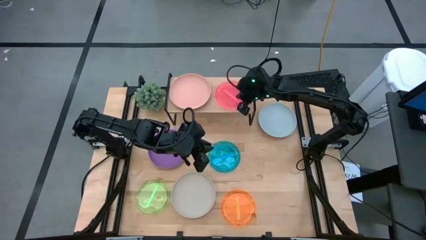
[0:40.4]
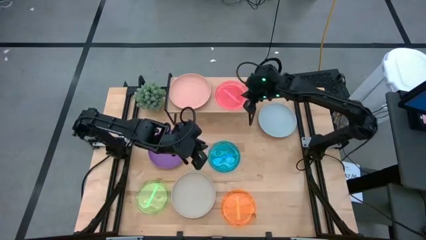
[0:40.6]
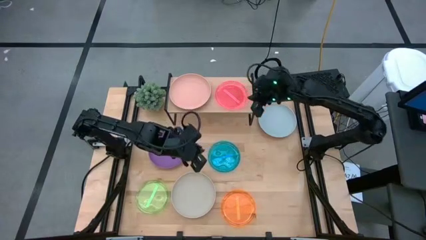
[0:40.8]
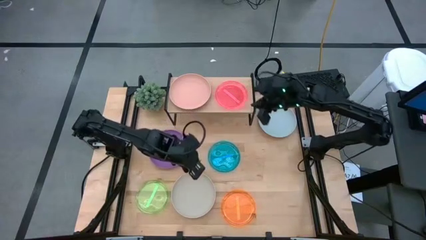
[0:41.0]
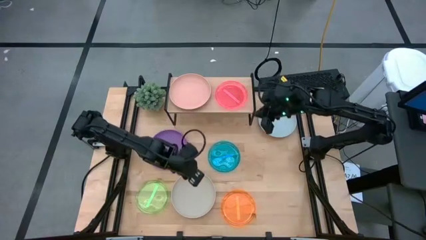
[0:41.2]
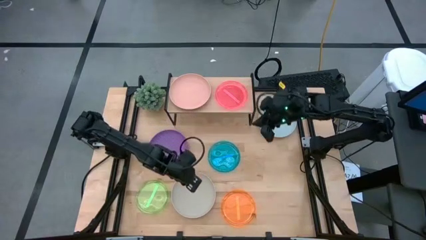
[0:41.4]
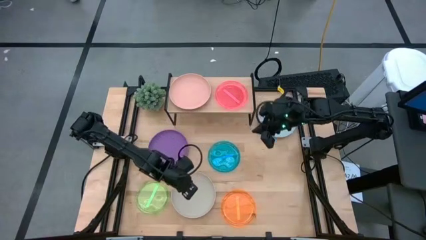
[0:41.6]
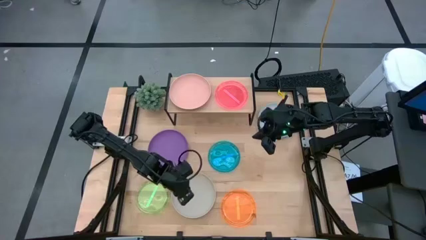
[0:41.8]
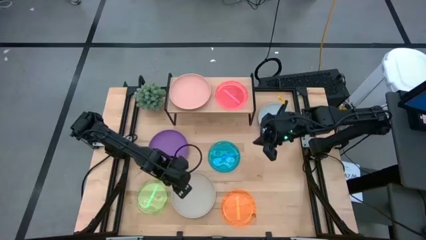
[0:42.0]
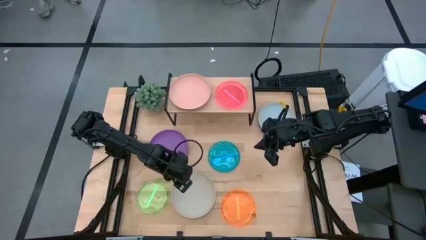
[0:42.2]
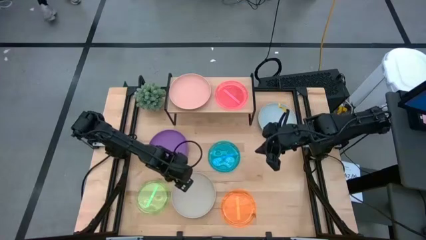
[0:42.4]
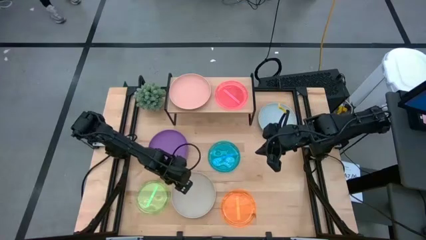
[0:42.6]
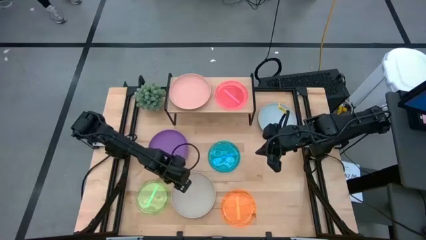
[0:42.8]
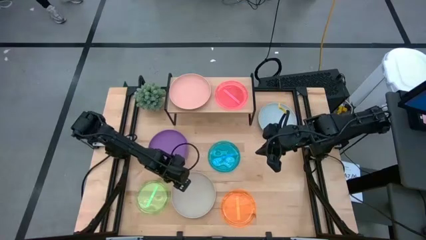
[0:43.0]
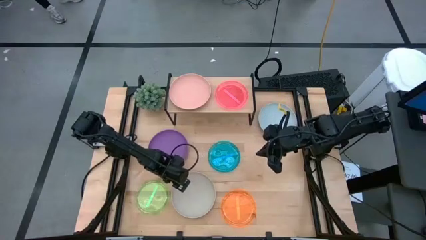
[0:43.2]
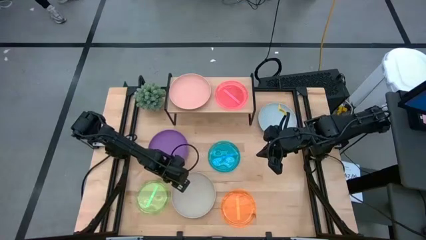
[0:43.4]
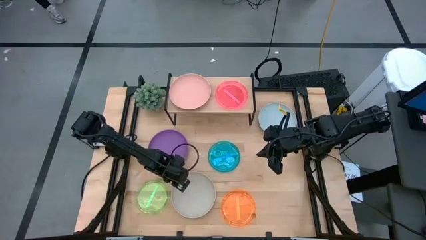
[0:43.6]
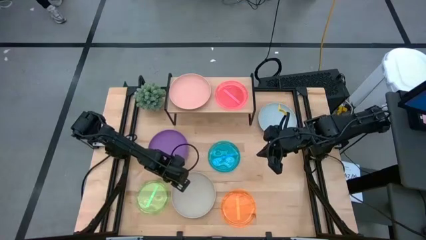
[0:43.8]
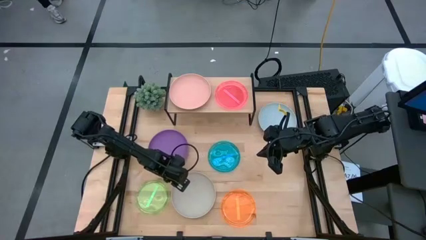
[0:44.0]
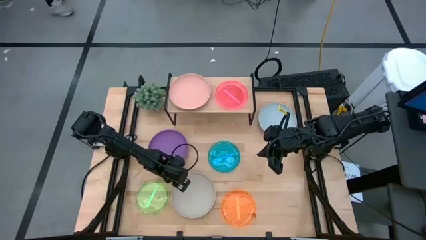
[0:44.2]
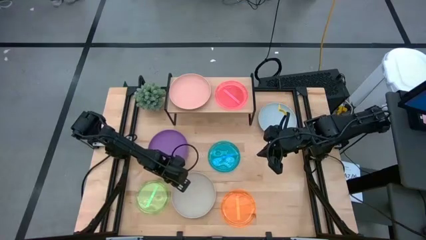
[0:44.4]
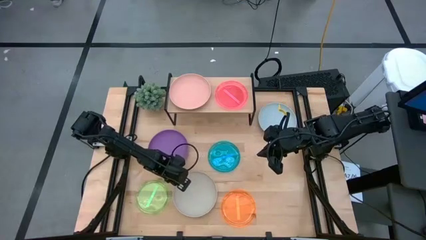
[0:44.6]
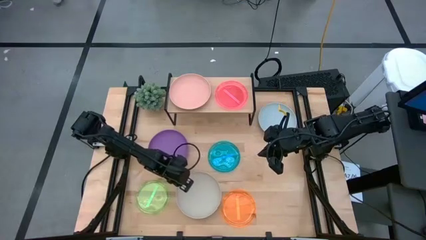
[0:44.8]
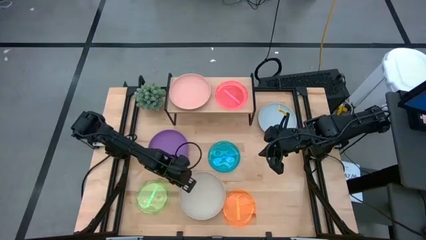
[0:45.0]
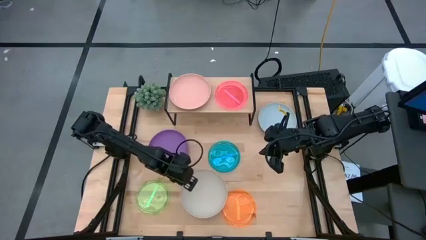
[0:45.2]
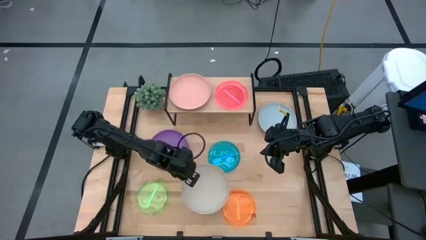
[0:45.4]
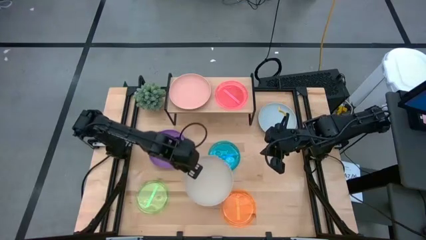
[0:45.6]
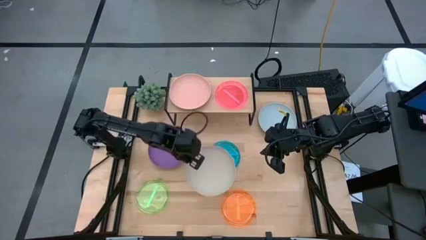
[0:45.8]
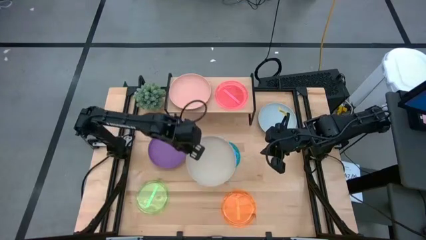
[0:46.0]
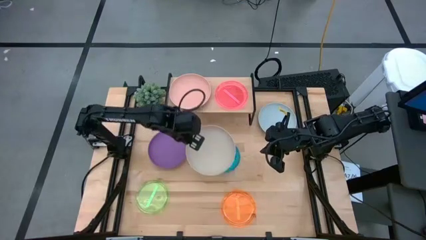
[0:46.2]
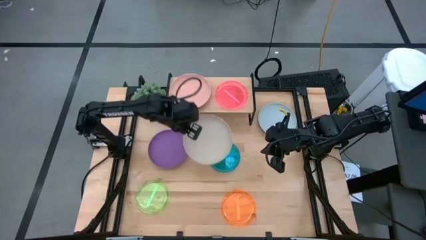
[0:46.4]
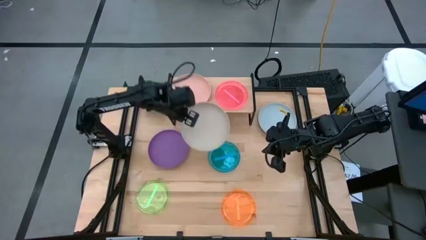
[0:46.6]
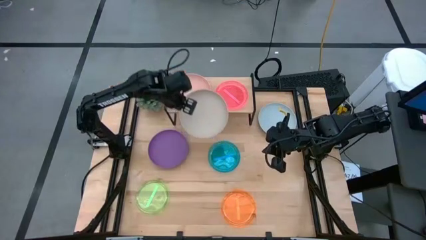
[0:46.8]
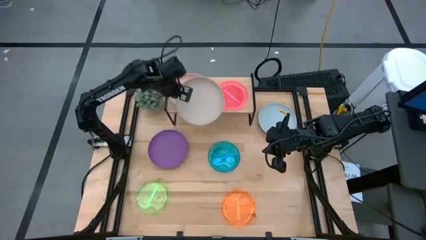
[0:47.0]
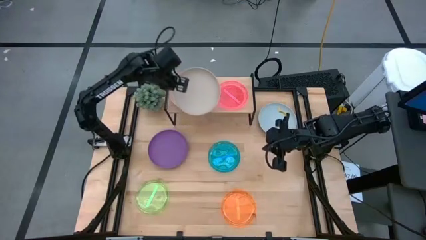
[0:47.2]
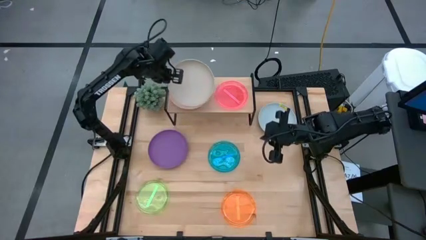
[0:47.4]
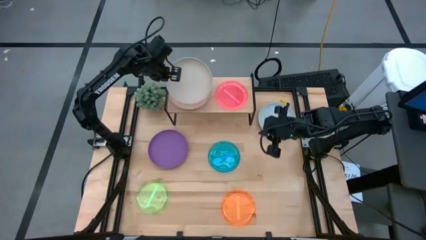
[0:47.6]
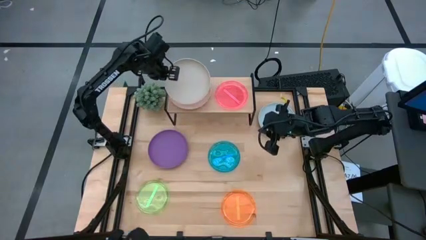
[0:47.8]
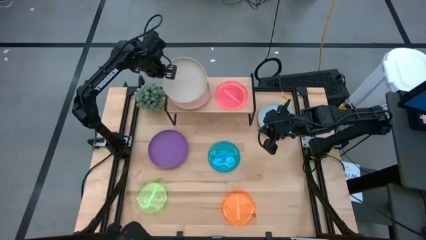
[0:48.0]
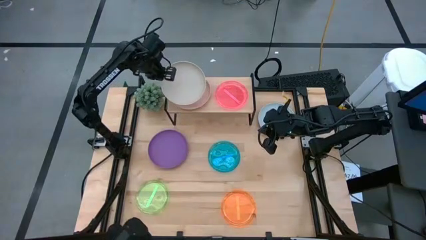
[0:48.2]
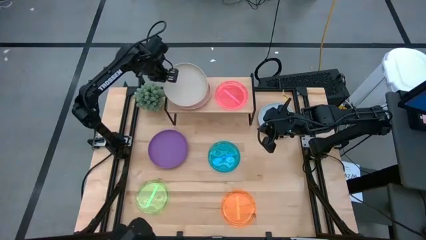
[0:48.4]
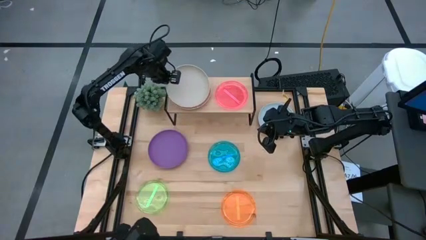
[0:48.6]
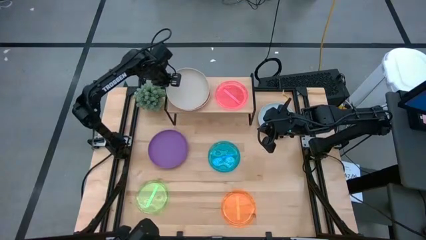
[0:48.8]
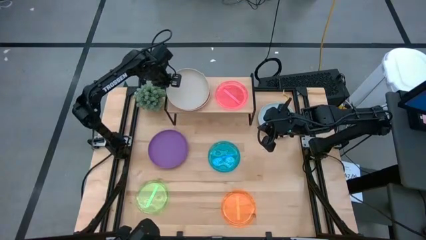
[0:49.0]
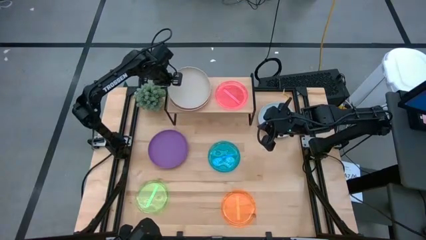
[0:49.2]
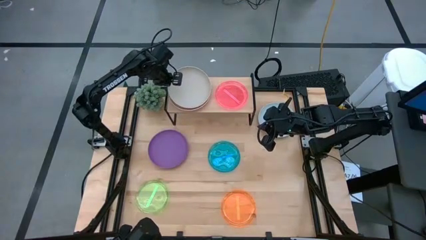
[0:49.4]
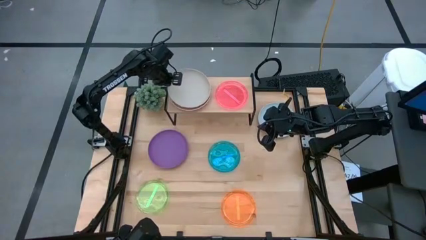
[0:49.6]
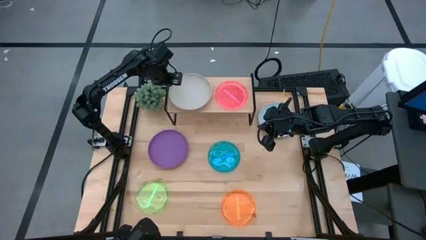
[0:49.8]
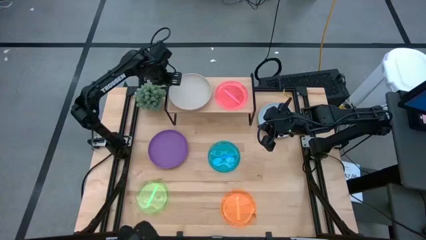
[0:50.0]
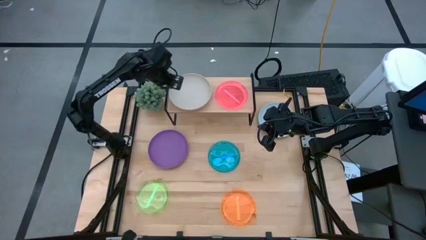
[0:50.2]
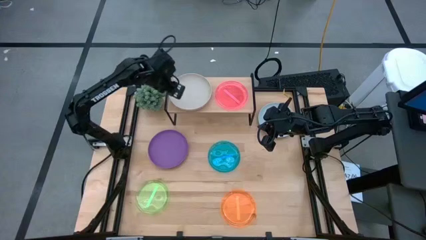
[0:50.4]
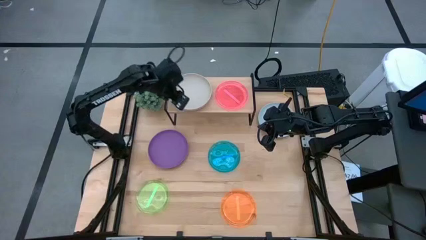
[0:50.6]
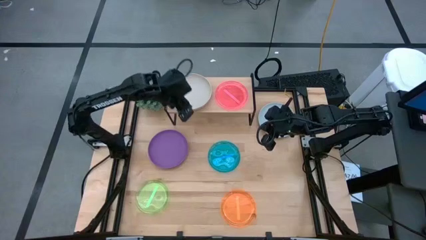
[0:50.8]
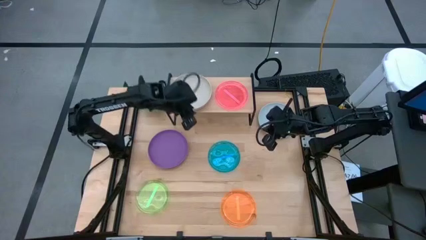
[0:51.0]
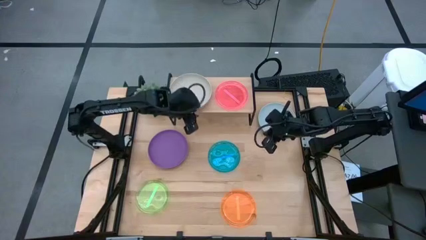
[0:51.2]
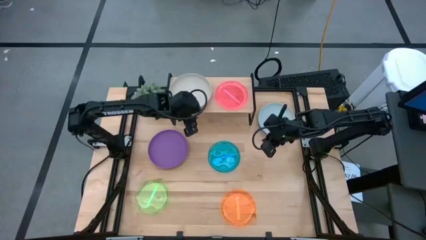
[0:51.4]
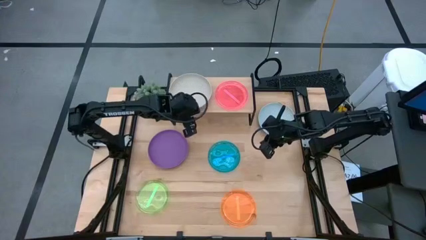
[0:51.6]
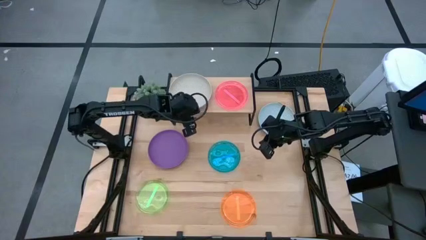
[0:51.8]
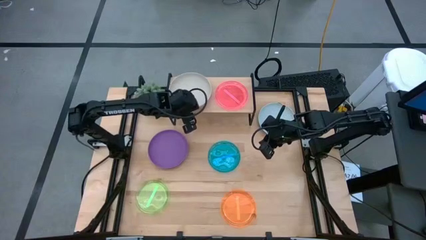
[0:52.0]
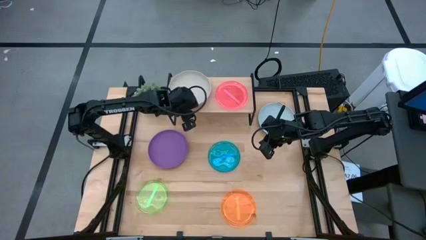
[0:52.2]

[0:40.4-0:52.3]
Task: Place and stack plates onto a shelf
Stack the gray plate on top of the pink plate on the shelf

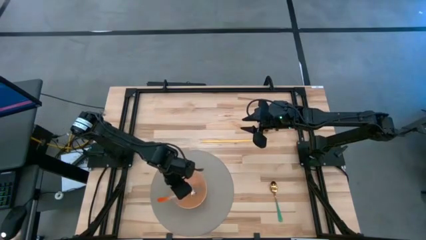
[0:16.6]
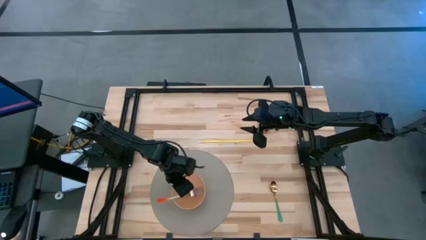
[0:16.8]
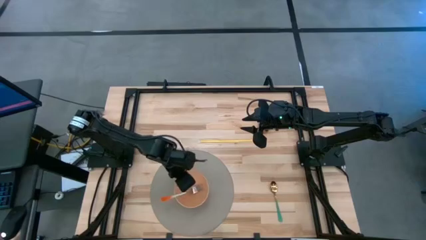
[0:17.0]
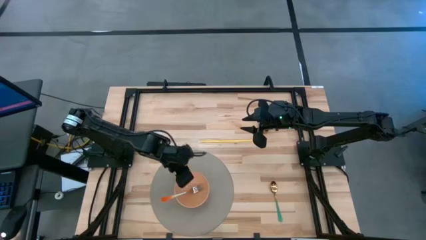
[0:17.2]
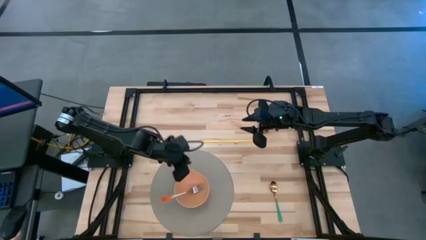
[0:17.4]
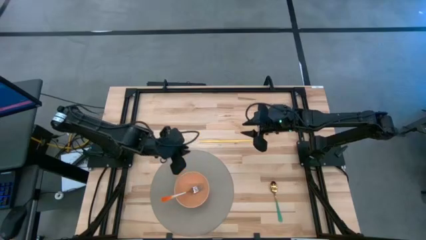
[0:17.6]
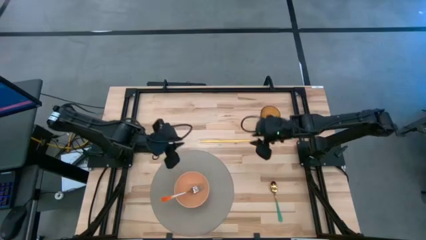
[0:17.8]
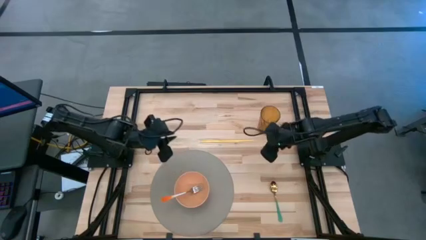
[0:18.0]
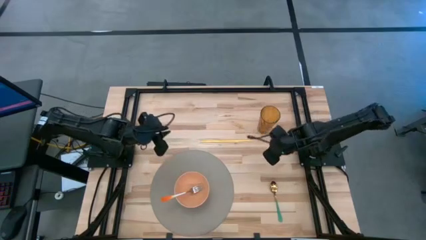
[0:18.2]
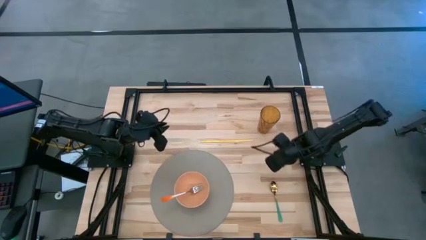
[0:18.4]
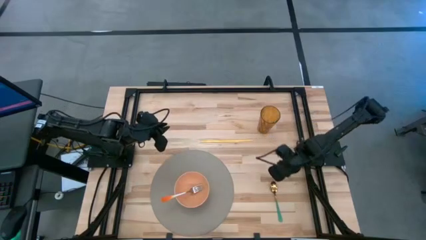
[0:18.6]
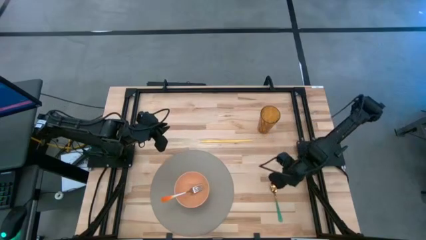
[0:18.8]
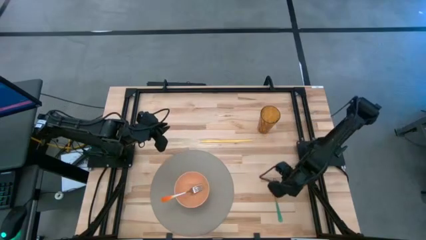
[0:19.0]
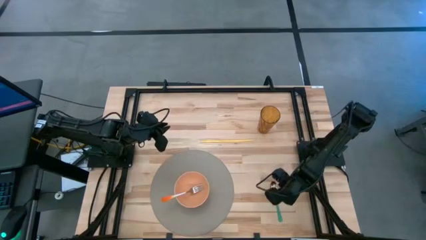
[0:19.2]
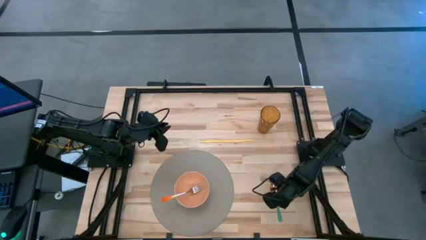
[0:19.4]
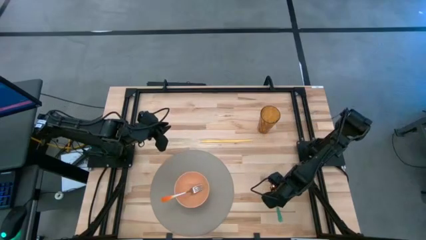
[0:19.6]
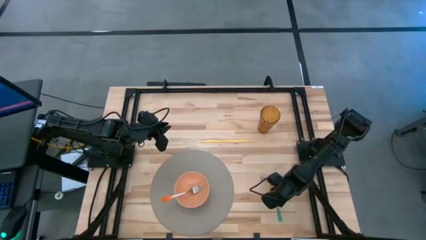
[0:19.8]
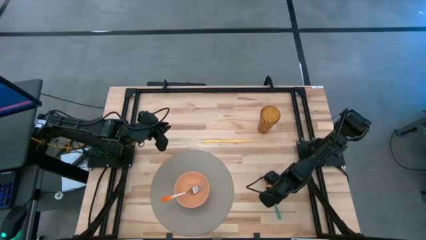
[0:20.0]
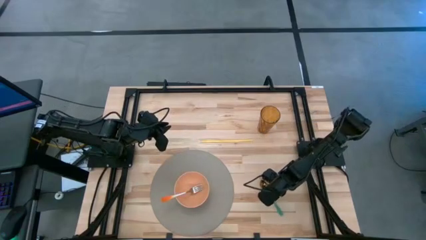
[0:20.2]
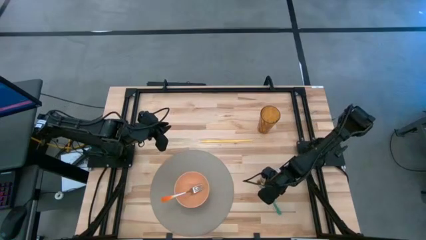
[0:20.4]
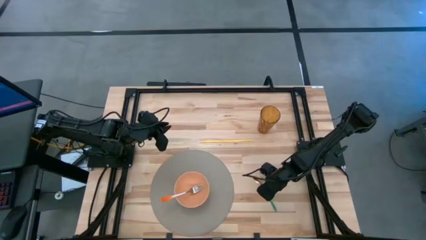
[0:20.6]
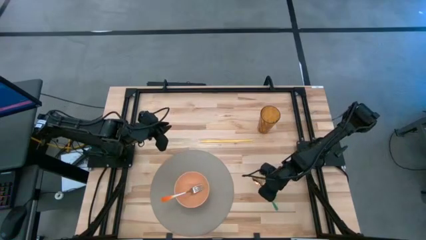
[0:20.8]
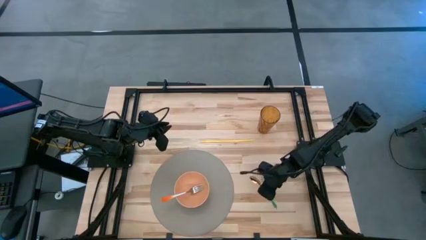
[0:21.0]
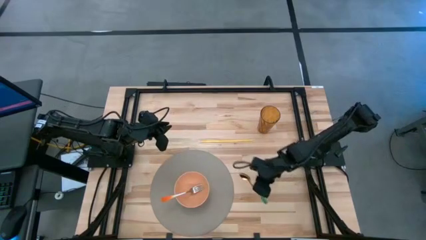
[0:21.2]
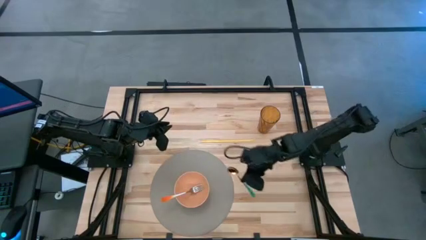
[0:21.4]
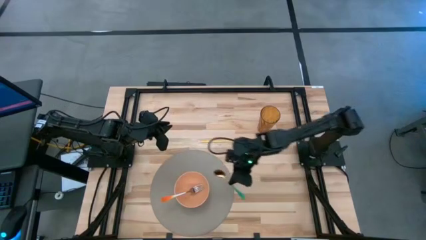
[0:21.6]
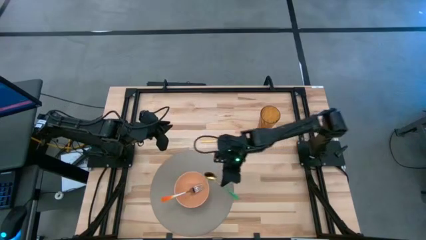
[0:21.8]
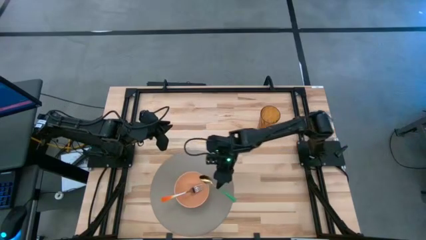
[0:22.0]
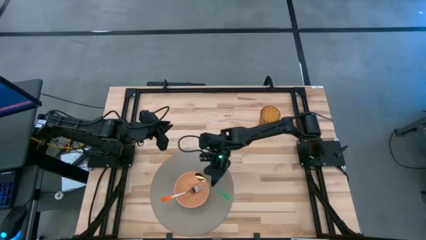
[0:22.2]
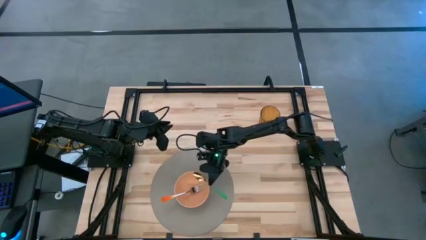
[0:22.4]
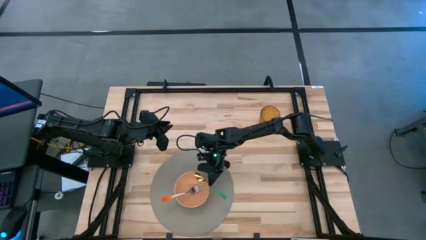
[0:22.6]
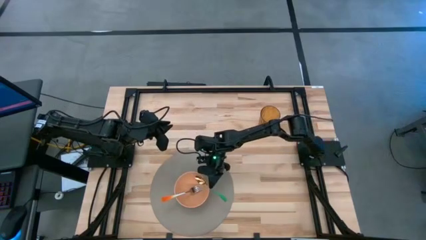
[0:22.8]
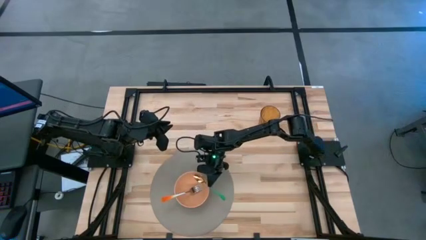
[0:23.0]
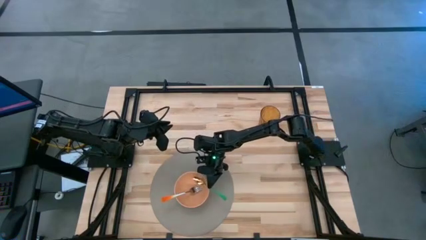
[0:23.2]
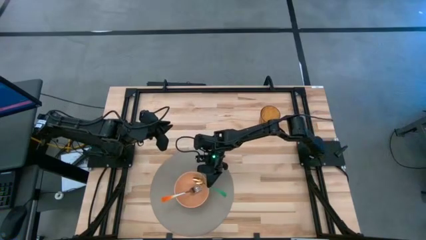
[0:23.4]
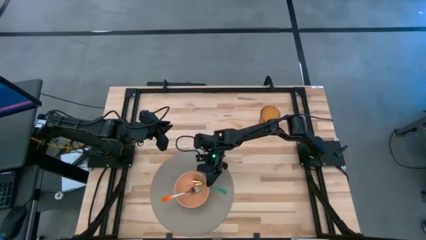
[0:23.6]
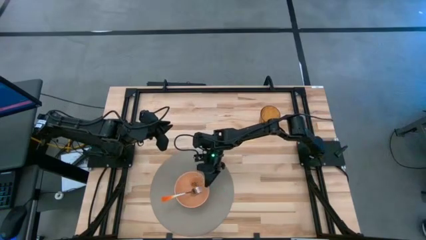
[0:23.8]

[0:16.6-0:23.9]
Task: Pick & Place Utensil
Put the green spoon into the orange bowl
